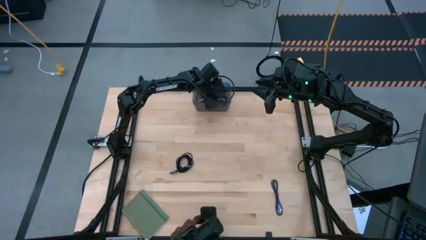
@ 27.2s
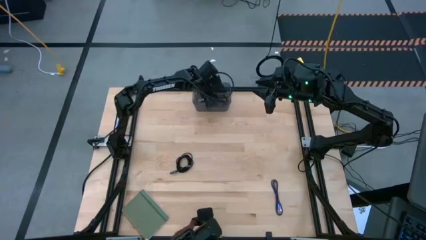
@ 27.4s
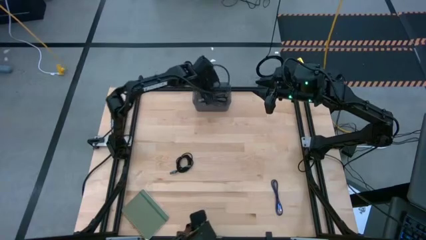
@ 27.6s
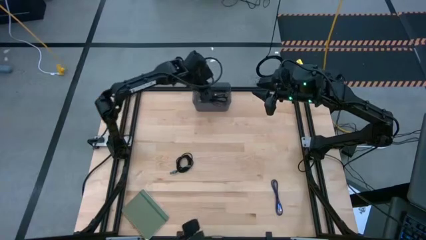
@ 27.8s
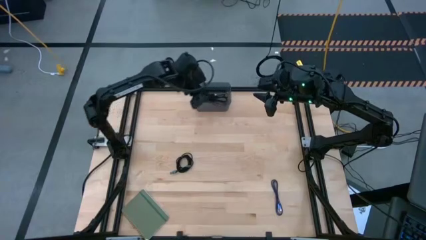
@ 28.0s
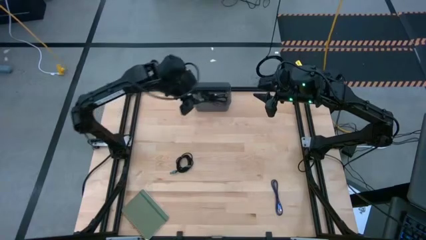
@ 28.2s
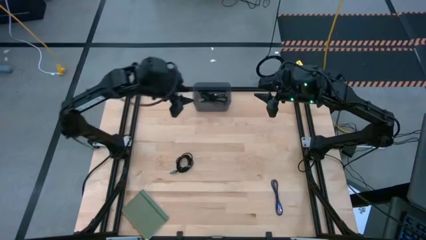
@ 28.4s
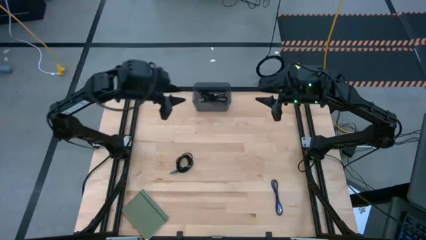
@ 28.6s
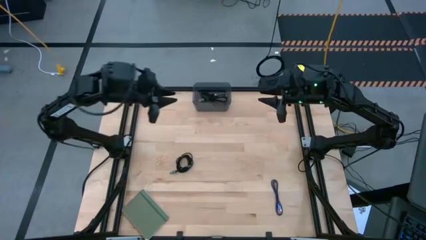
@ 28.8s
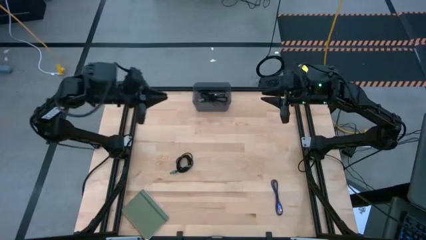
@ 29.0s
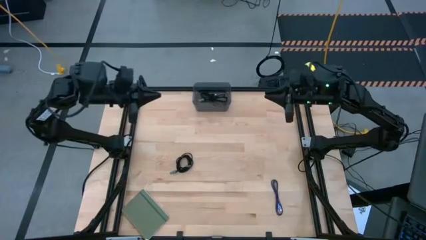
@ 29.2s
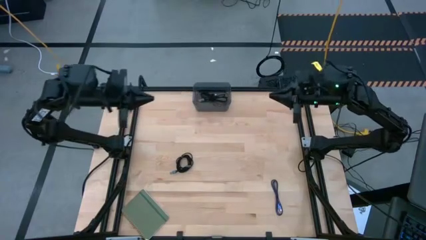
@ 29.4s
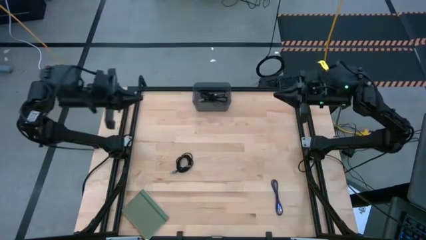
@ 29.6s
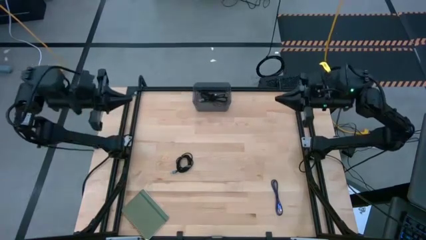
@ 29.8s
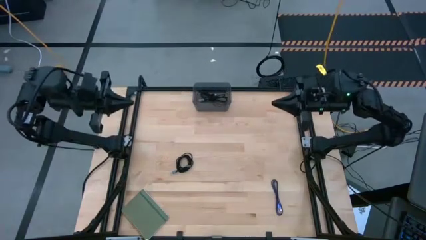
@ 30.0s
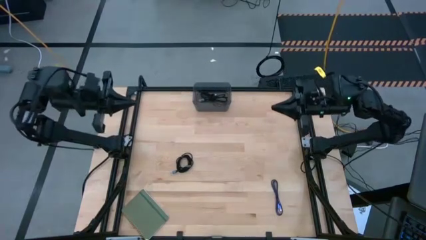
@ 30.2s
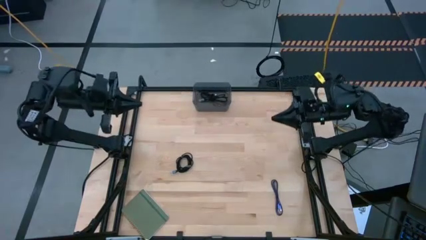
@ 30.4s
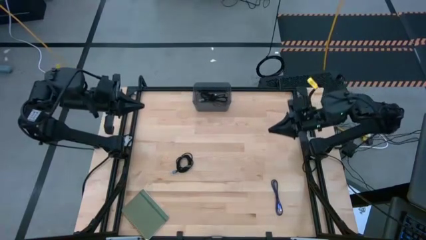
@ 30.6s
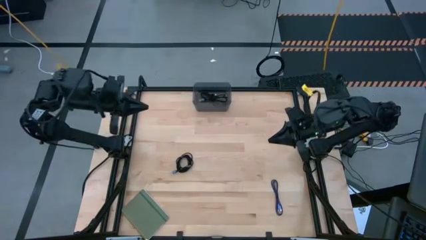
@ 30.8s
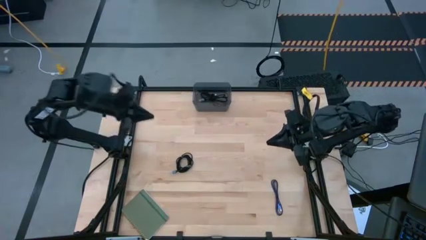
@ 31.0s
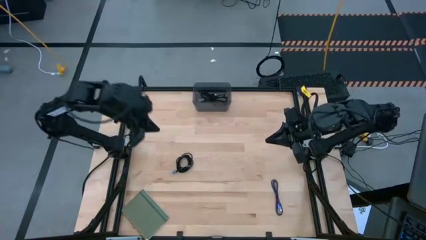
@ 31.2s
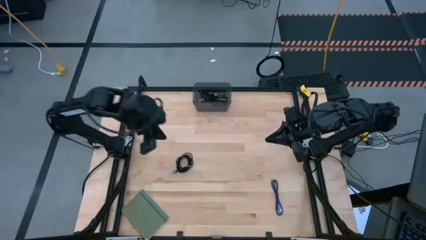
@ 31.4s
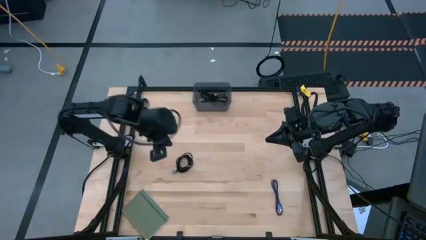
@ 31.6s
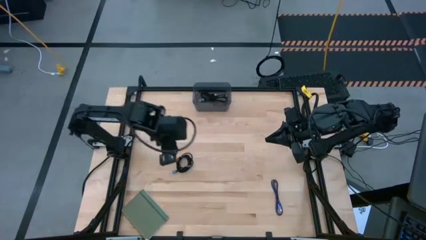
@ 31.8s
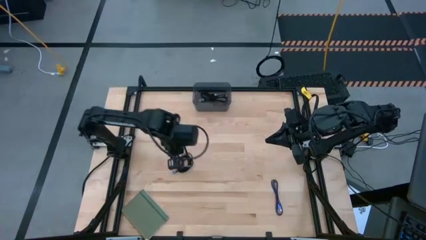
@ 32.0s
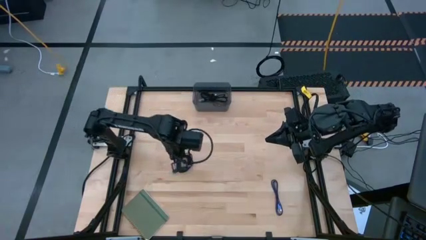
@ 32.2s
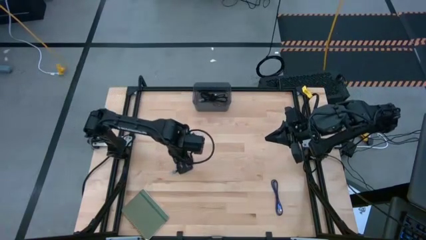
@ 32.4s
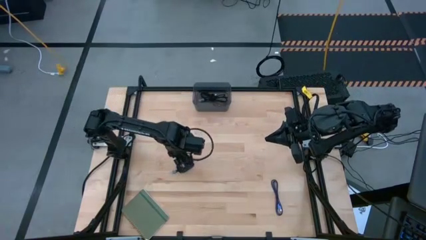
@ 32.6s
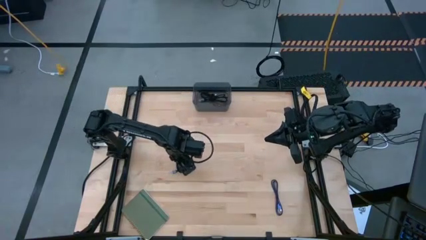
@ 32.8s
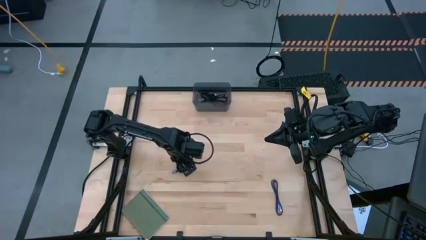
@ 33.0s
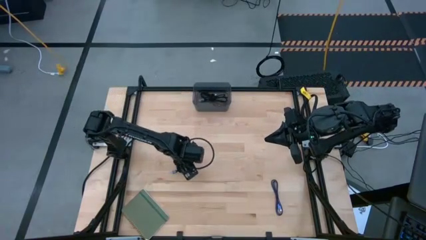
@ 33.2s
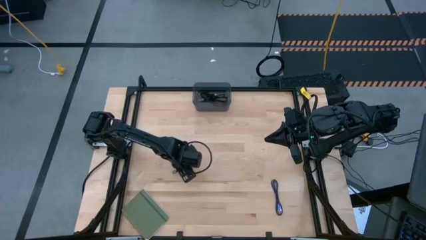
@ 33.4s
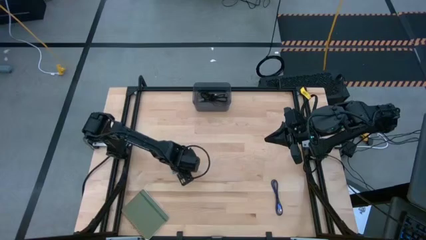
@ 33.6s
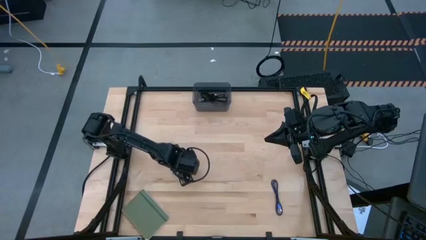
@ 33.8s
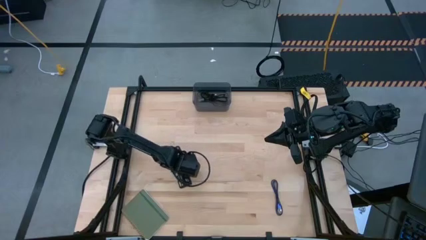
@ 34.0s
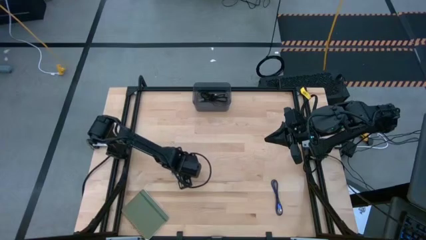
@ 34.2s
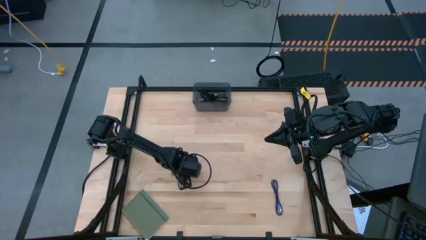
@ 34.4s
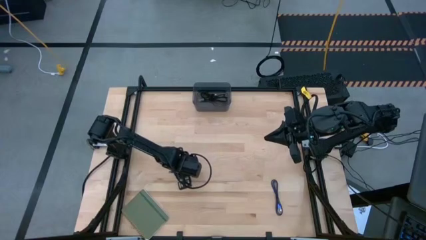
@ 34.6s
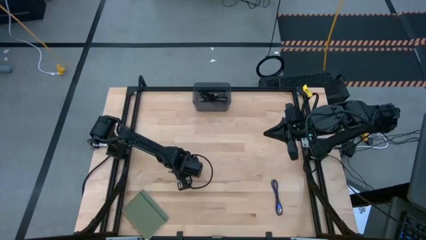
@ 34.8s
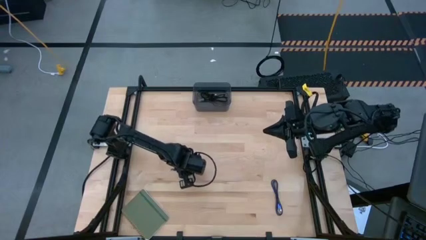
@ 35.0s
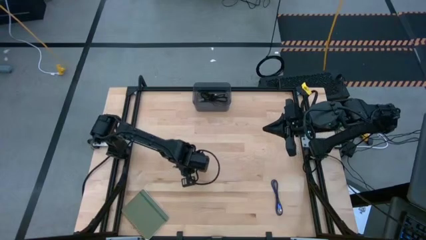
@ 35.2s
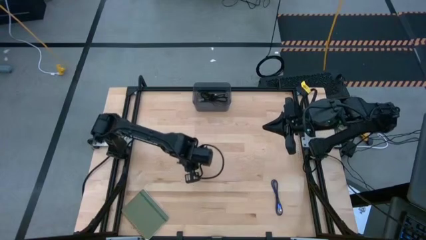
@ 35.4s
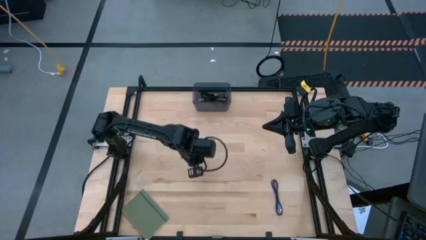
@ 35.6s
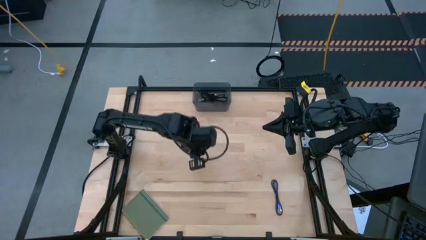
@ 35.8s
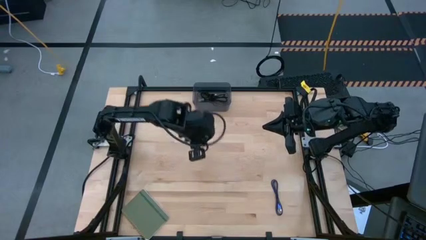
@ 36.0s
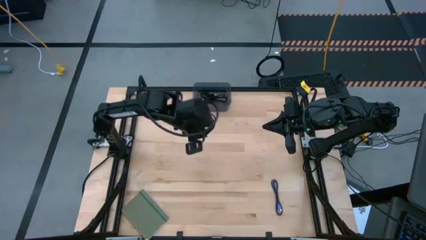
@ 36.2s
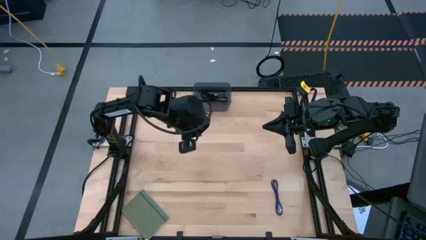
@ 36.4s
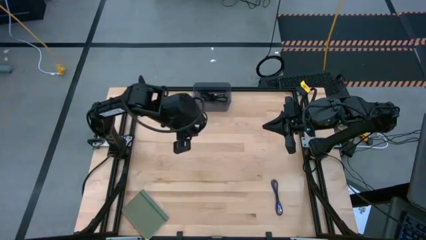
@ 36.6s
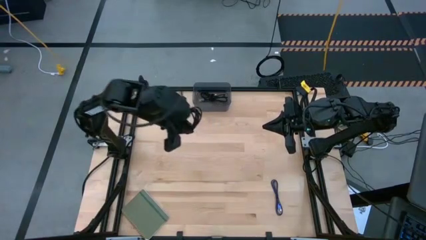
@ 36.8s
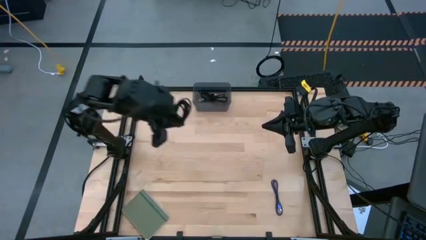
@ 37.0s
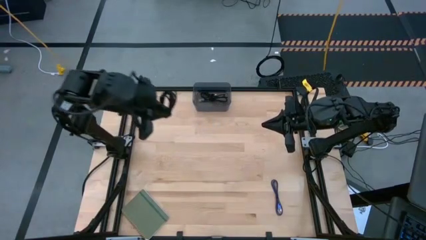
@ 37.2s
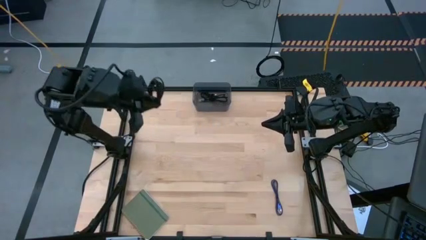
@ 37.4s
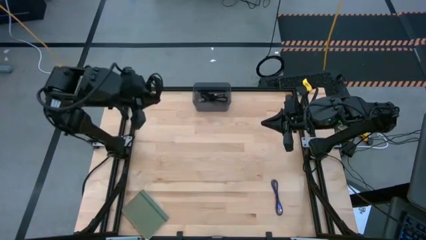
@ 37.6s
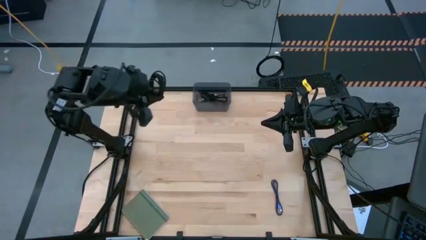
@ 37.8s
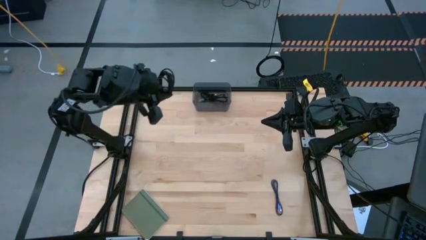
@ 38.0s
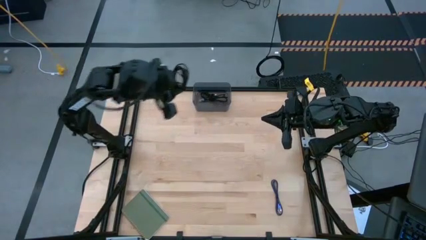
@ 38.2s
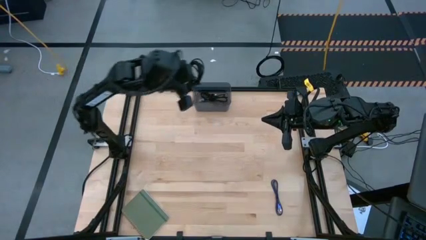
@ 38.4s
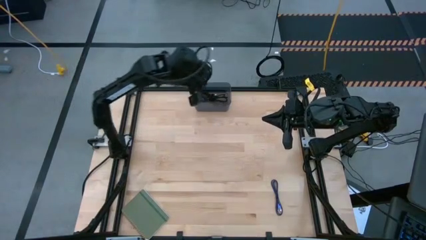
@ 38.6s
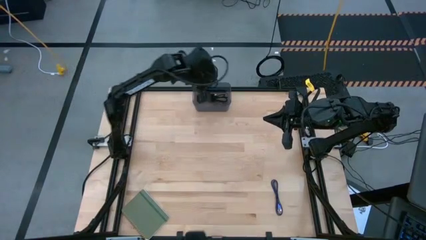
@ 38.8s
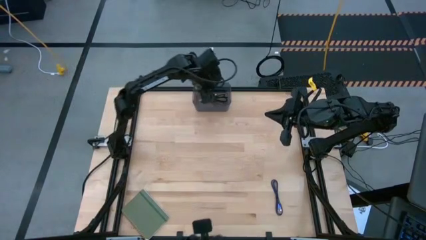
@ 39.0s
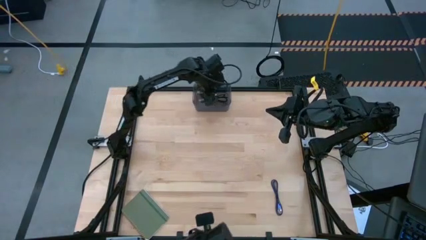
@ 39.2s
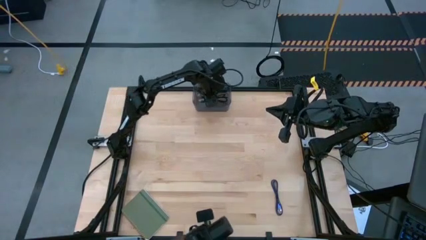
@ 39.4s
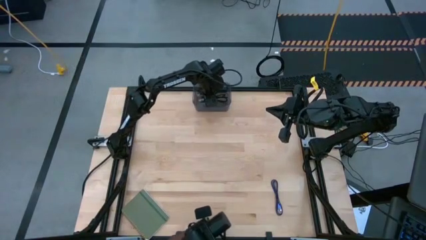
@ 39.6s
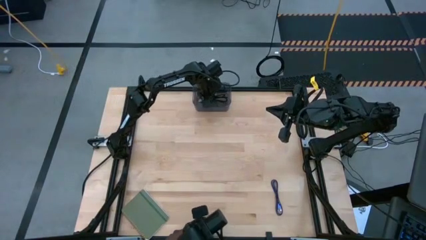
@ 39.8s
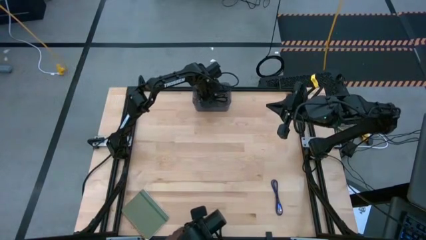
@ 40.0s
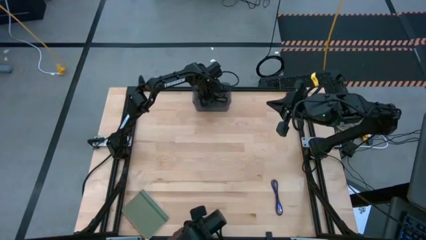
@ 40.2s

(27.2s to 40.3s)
Task: Pick and place USB-C Cables
Put the black USB cable into the black bin

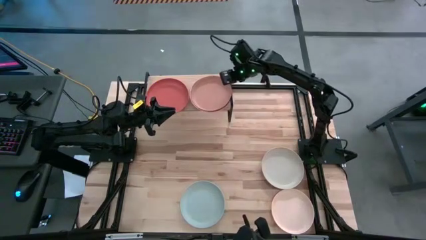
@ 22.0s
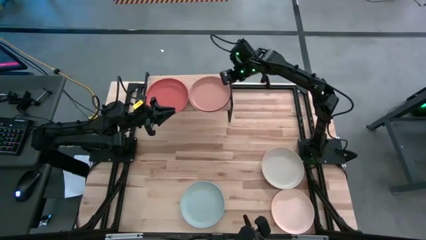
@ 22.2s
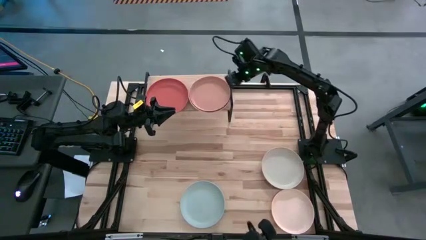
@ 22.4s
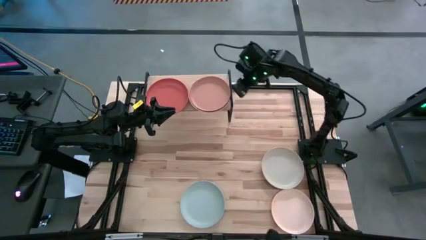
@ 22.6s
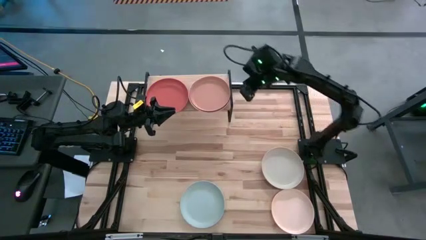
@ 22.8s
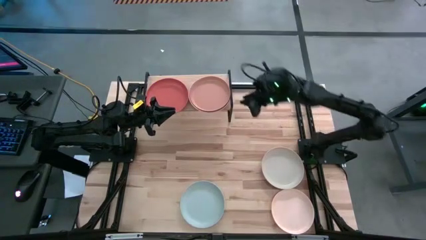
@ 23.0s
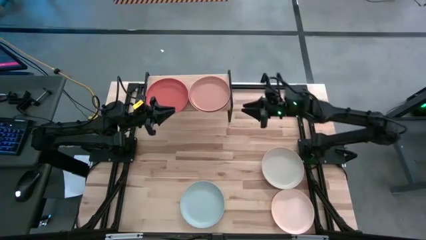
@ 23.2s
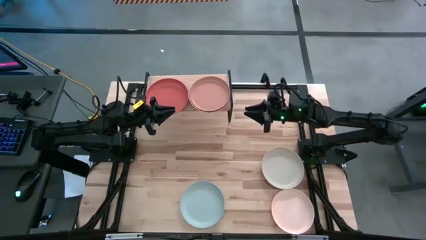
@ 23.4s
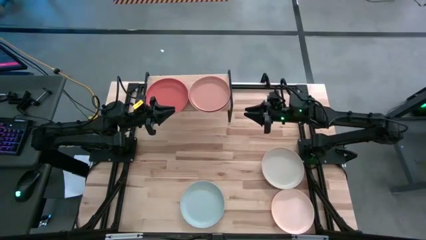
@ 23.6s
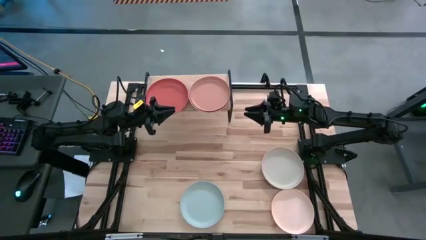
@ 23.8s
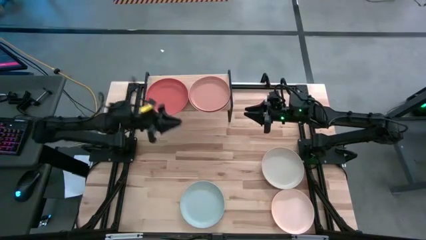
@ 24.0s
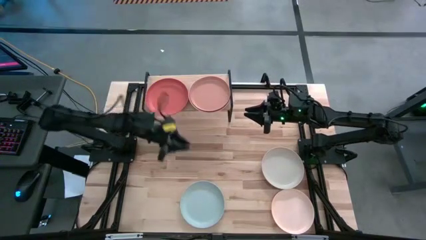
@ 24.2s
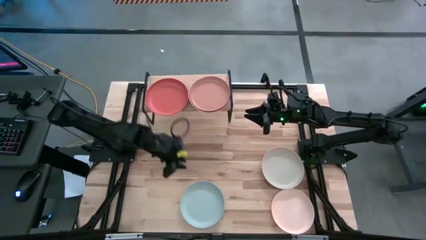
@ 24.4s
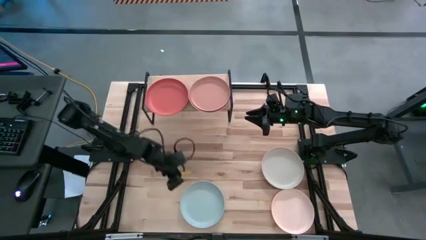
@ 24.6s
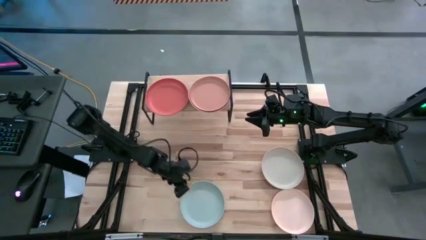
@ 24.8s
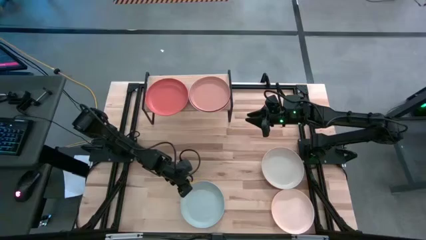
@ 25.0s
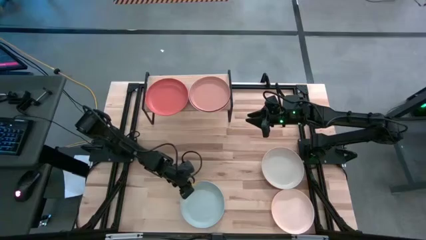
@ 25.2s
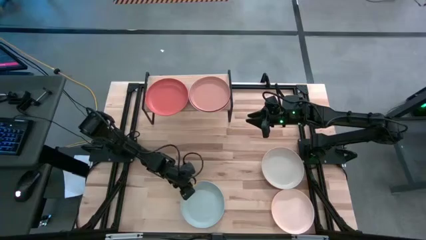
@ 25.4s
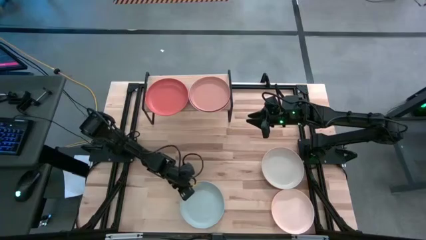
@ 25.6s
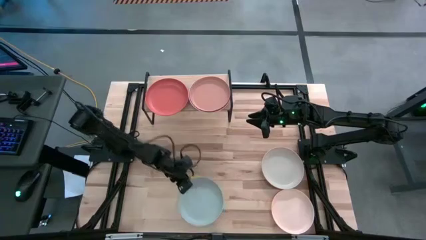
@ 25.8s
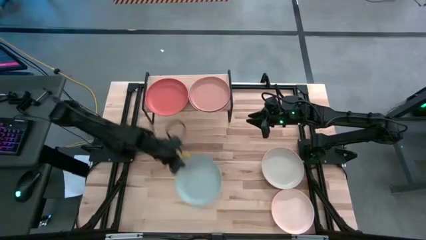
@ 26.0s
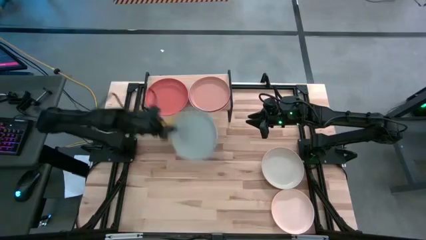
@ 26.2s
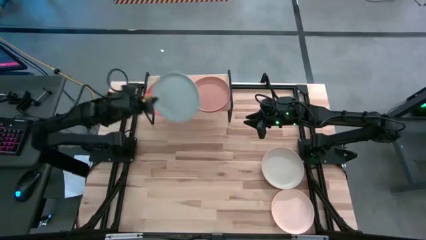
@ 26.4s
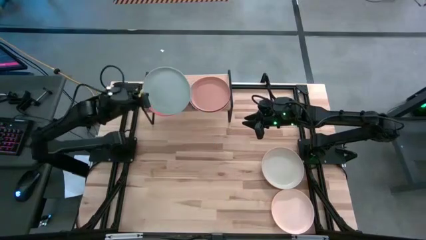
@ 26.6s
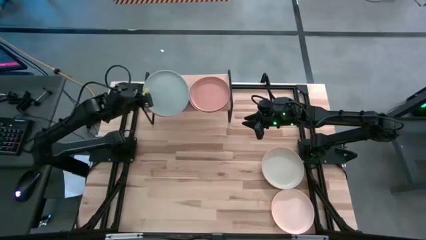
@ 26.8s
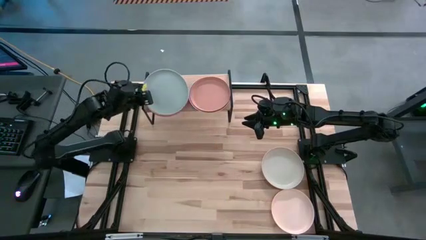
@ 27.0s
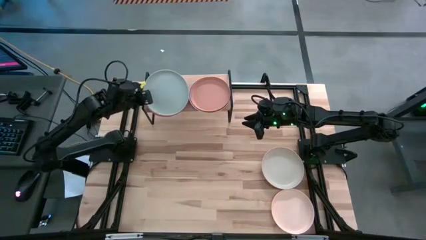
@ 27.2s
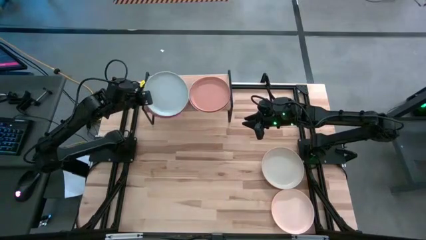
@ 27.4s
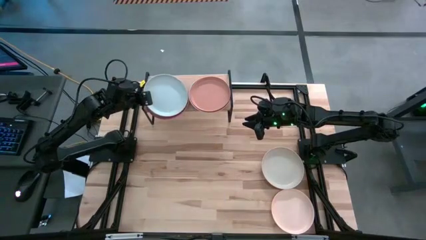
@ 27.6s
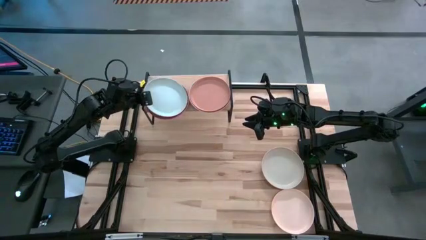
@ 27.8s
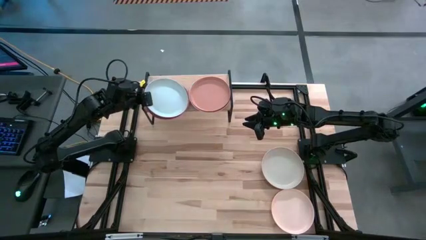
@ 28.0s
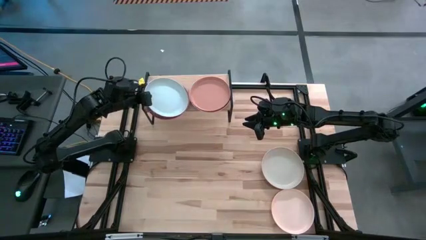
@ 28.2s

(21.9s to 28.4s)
Task: Place and stack plates onto a shelf
Stack the light blue plate on top of the orange plate
